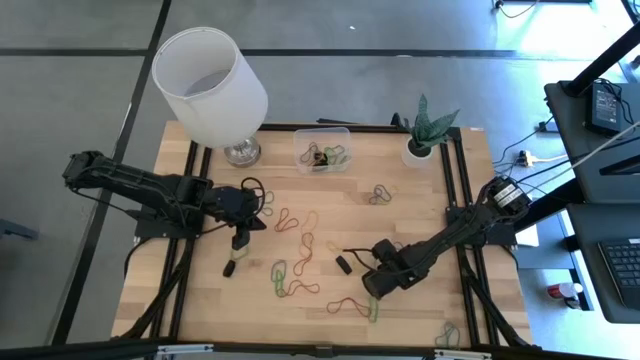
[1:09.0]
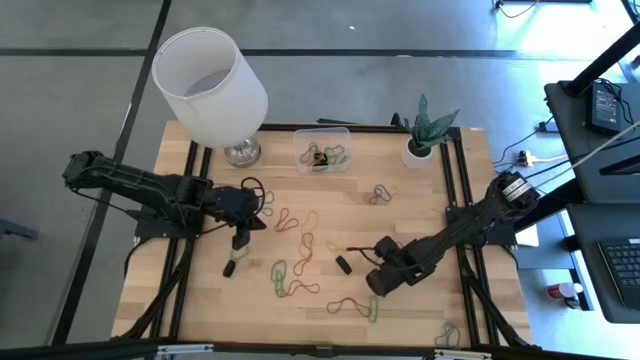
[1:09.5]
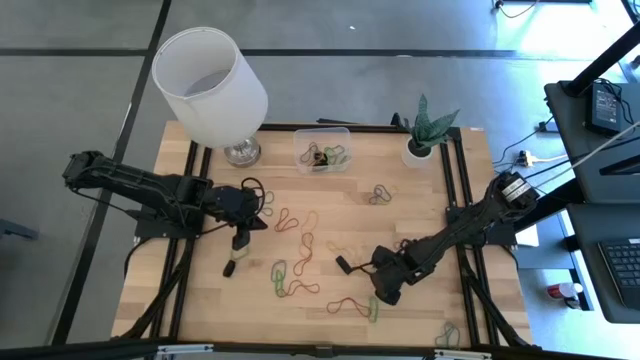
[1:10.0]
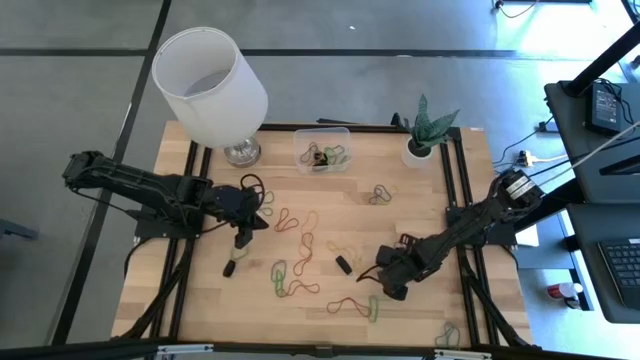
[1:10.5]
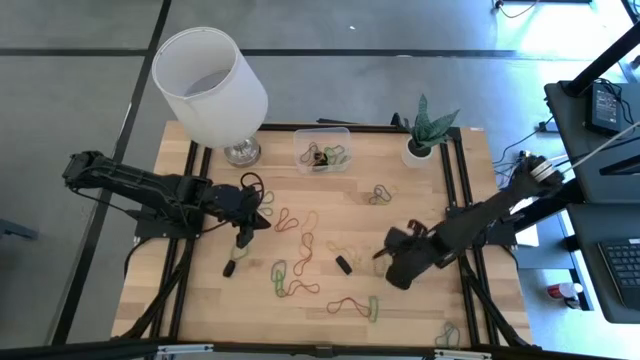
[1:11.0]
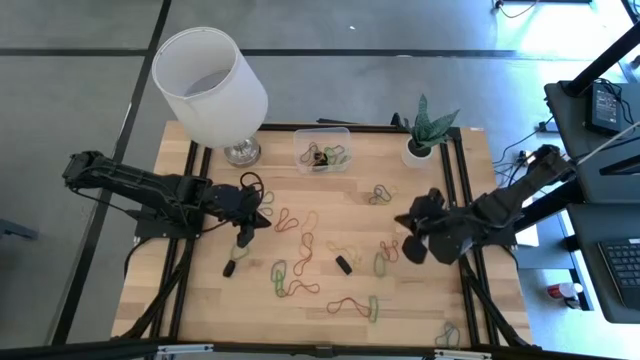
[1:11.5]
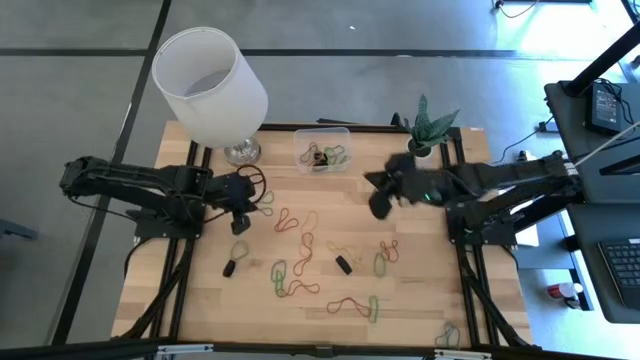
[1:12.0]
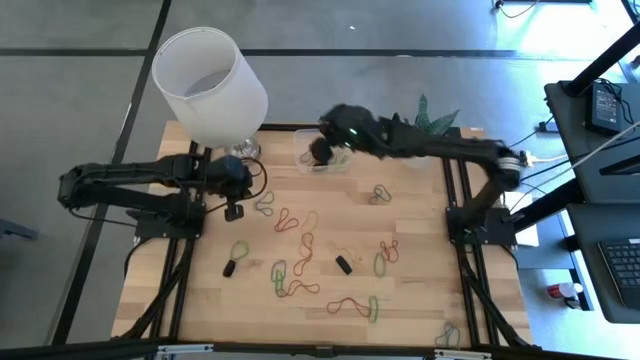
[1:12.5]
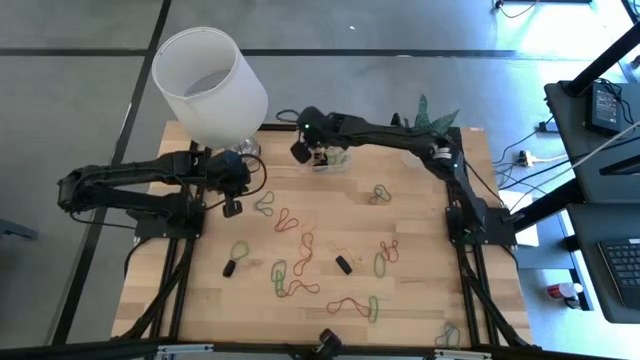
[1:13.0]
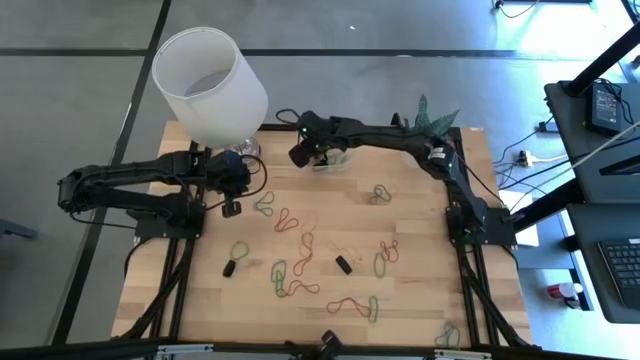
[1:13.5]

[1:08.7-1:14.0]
Task: Pick and place rubber bands into bin
Put the yellow rubber band into the transparent bin

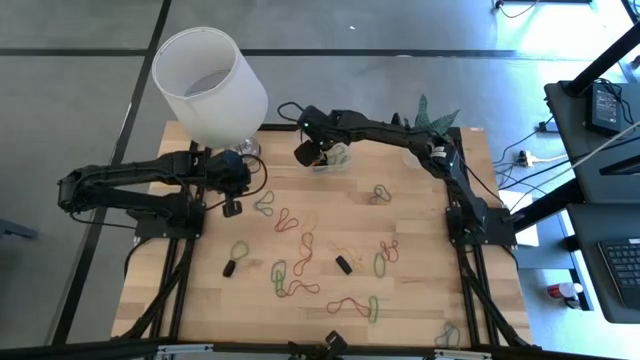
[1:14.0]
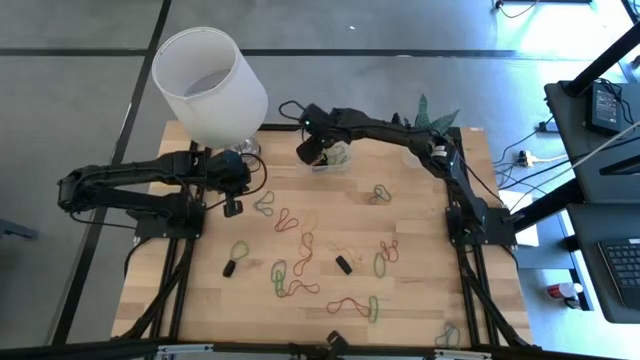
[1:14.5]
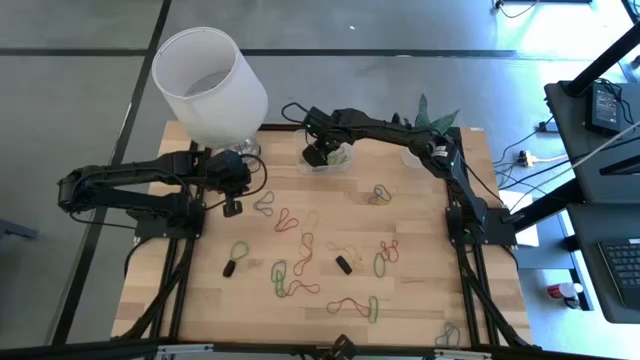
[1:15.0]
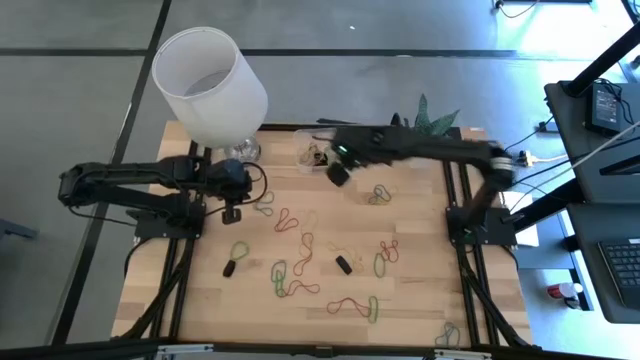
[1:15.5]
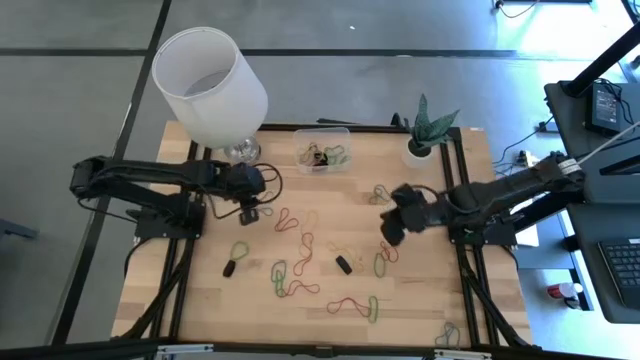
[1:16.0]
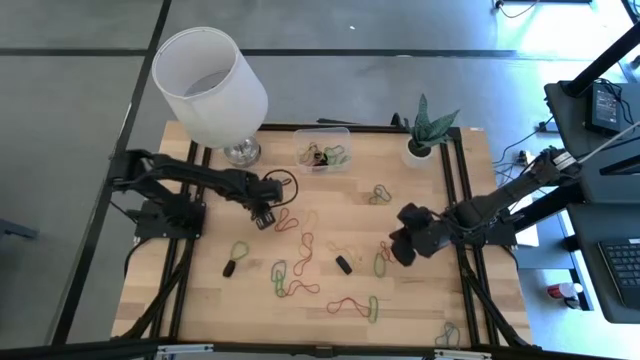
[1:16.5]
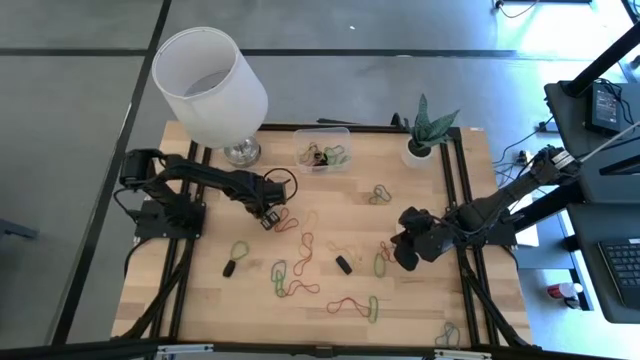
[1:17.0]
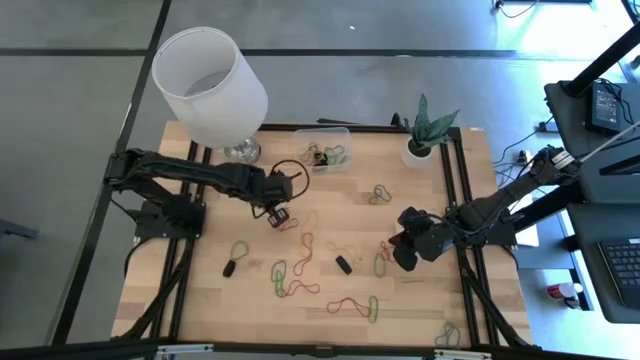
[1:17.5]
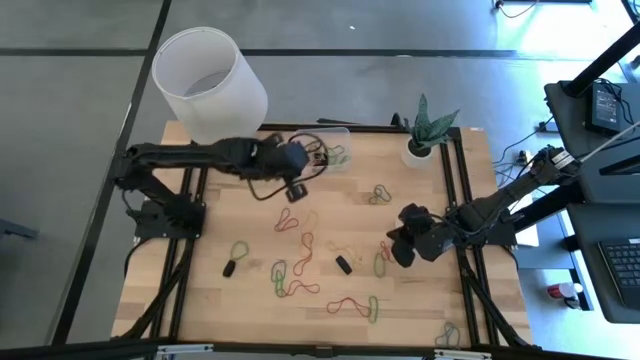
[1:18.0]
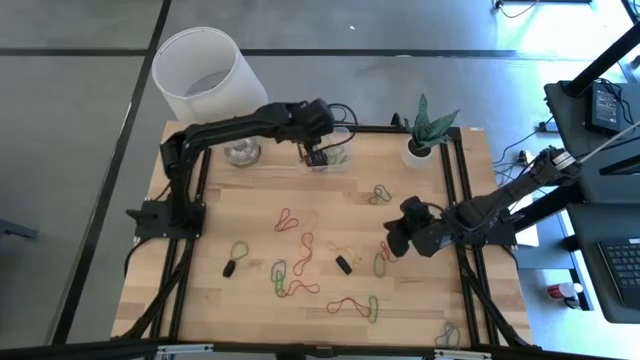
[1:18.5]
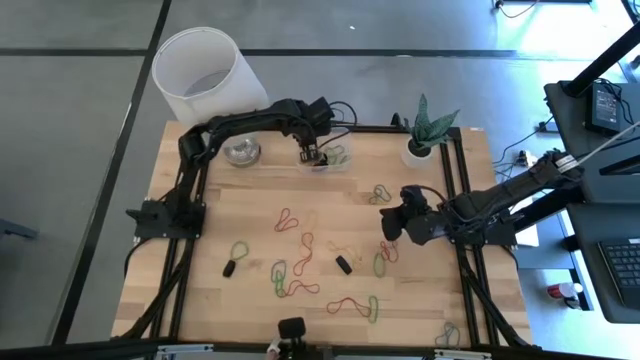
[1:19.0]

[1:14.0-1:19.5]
Put the blue rubber band into the transparent bin

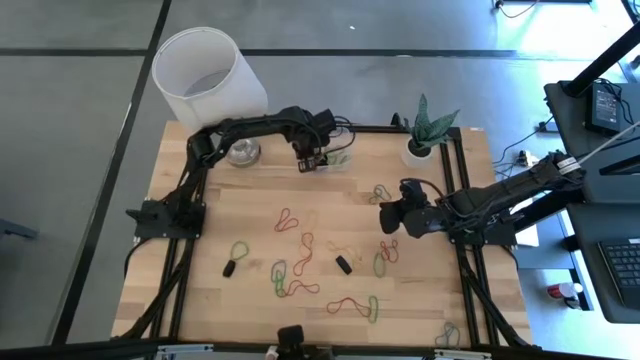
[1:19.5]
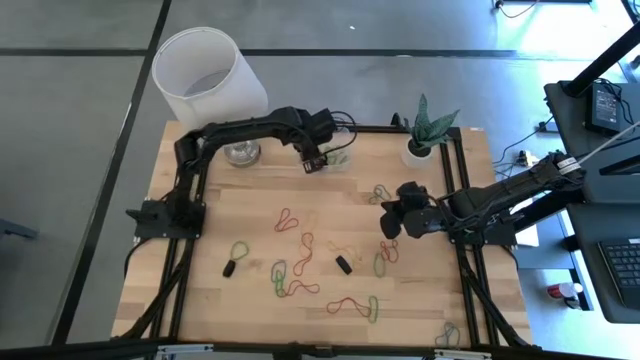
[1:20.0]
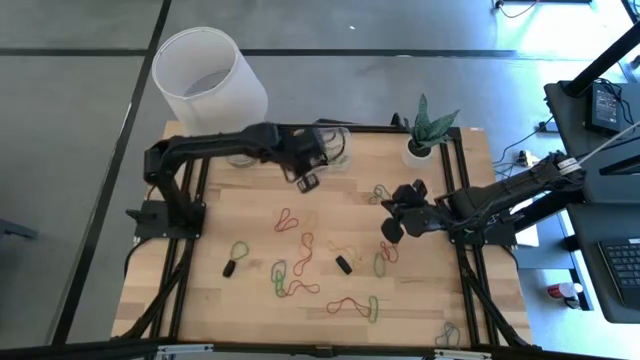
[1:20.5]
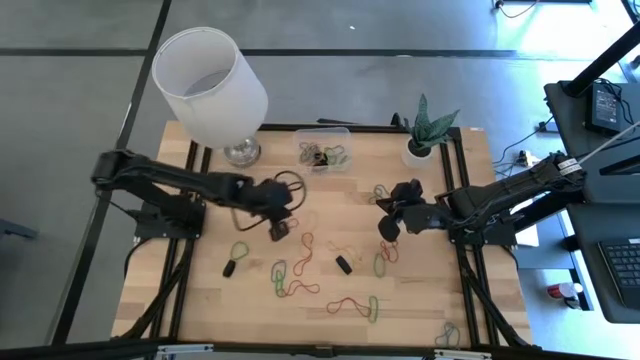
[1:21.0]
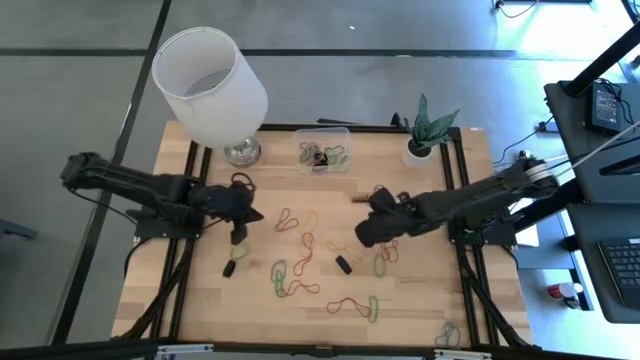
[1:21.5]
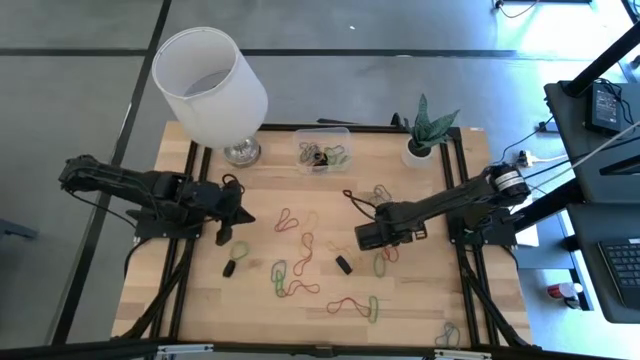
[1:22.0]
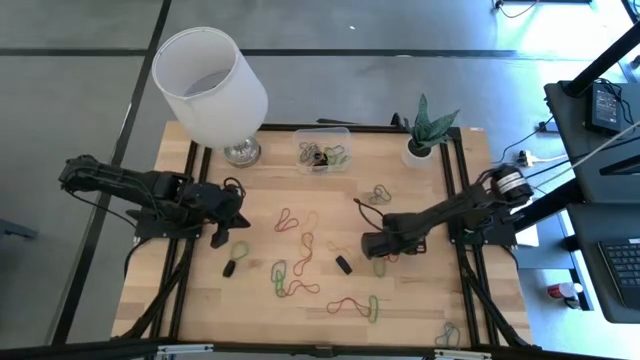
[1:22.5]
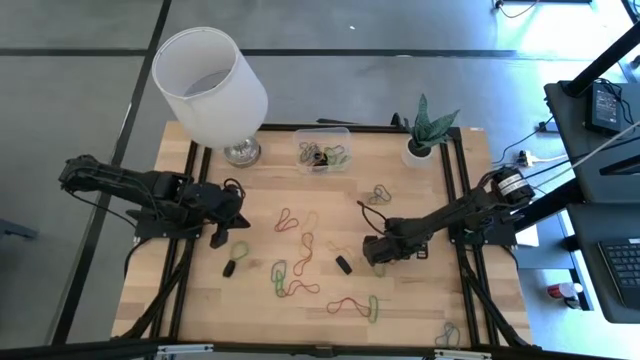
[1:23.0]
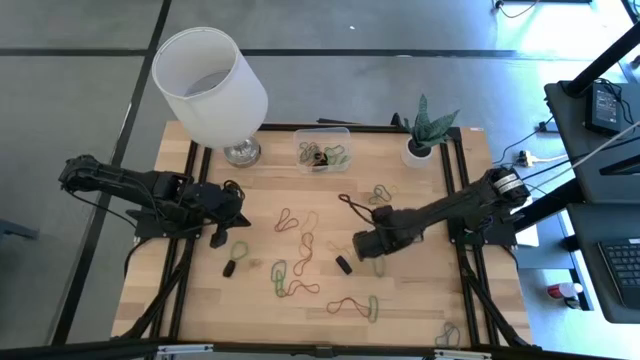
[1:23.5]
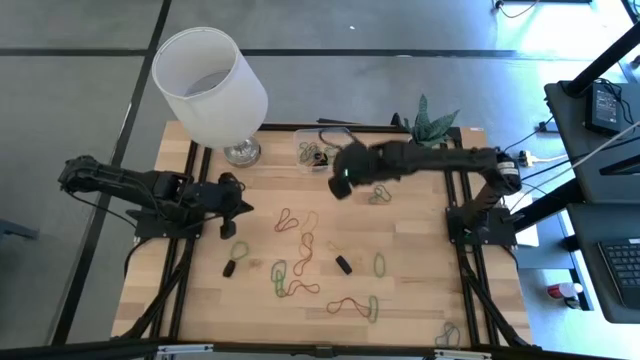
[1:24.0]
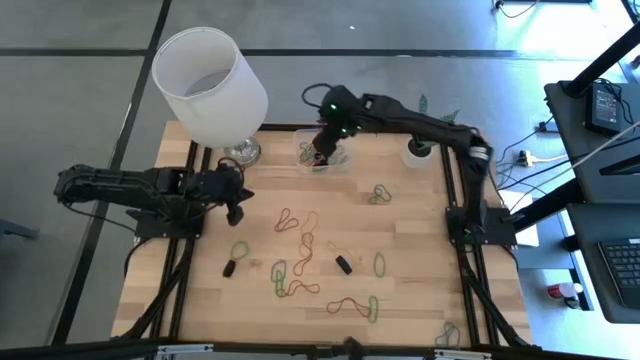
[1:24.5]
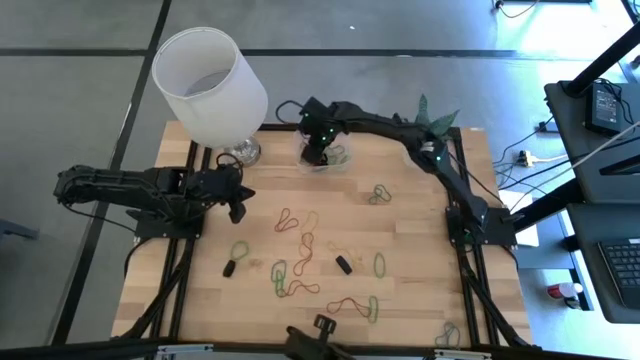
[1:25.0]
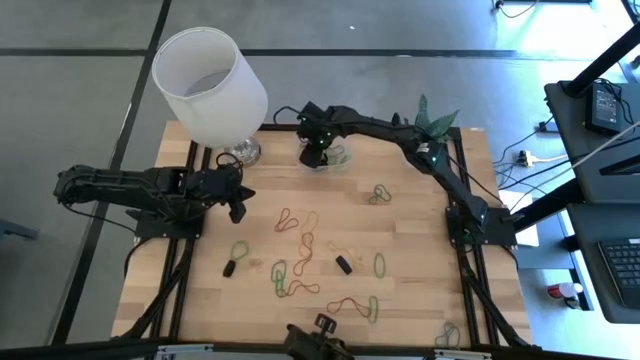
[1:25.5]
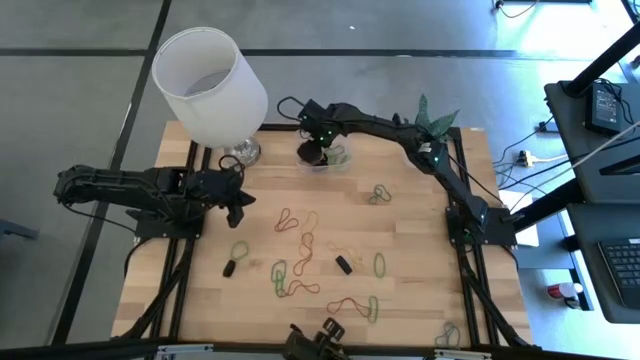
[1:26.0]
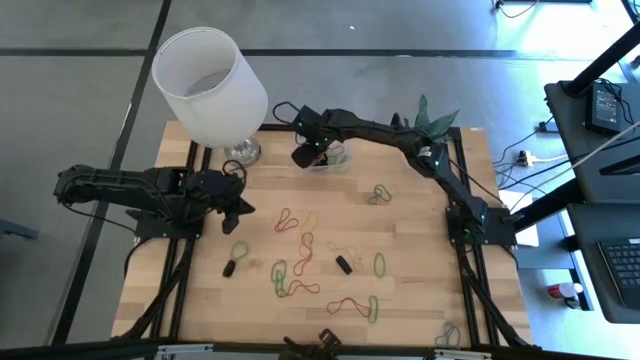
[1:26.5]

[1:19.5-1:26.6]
Put the red rubber band into the transparent bin

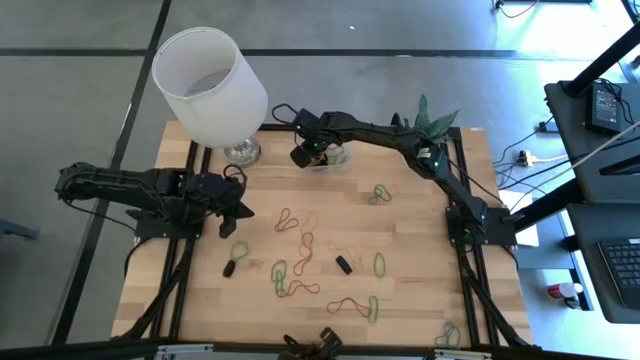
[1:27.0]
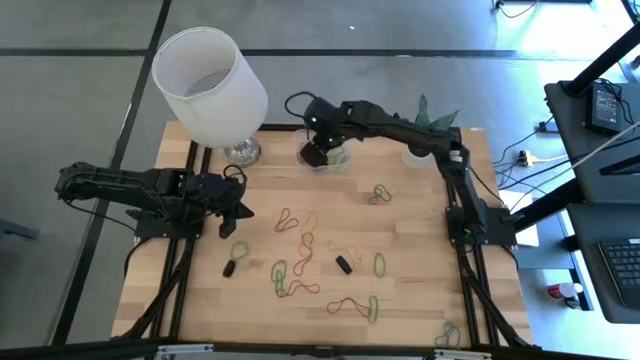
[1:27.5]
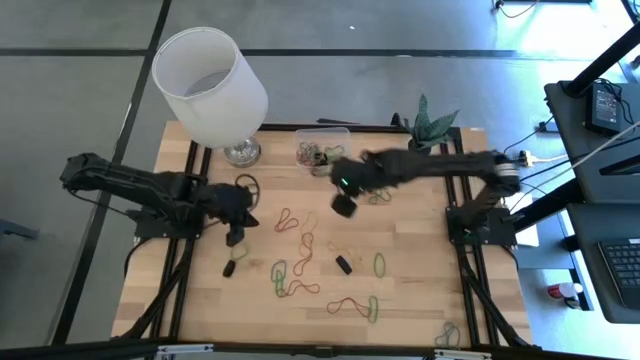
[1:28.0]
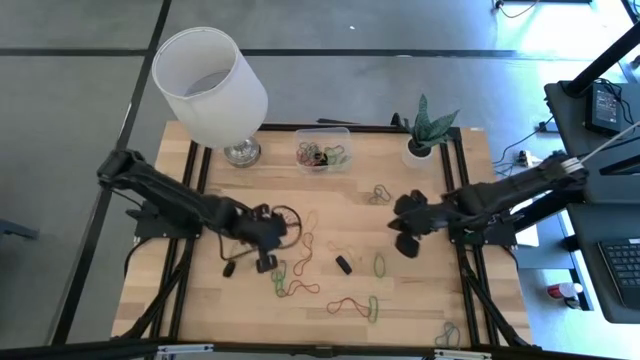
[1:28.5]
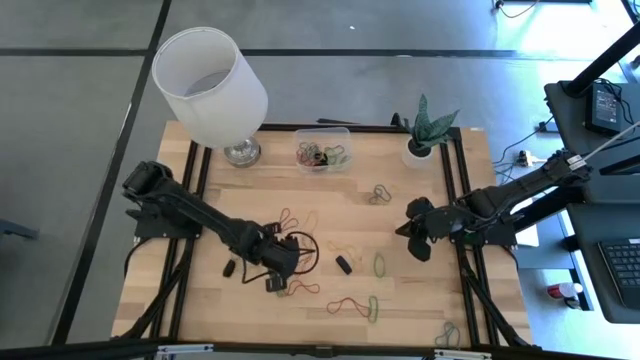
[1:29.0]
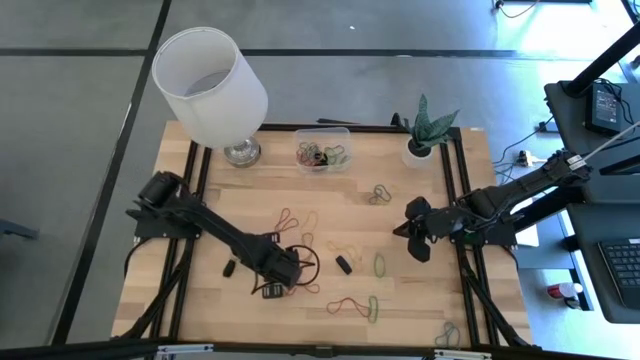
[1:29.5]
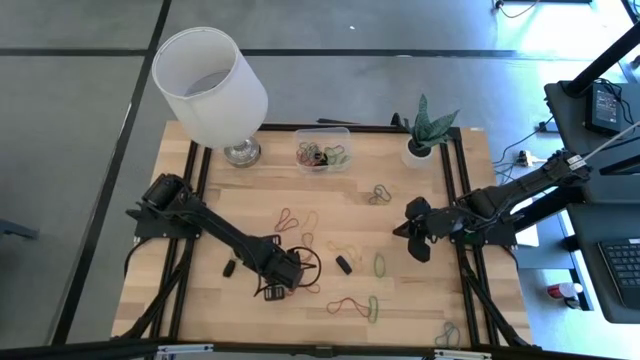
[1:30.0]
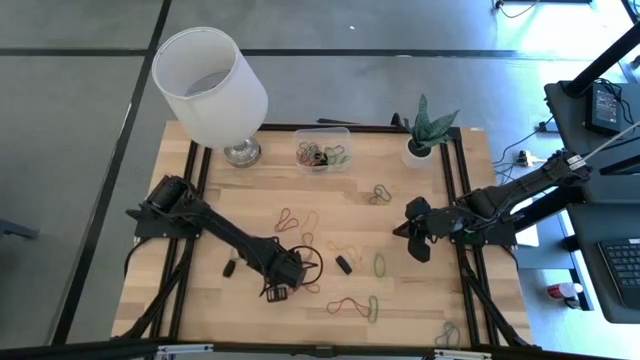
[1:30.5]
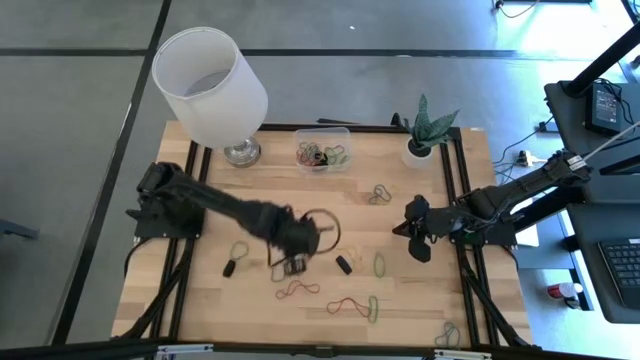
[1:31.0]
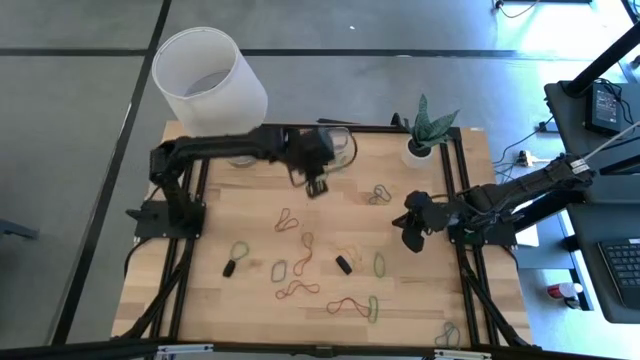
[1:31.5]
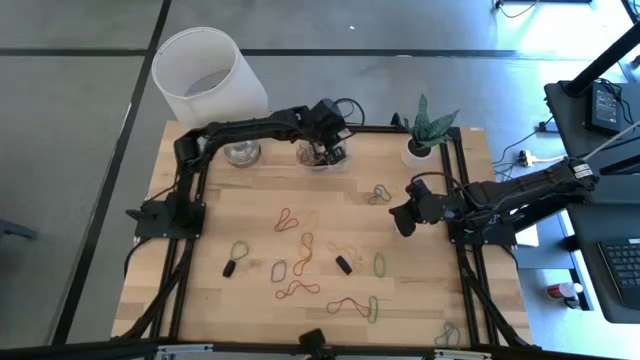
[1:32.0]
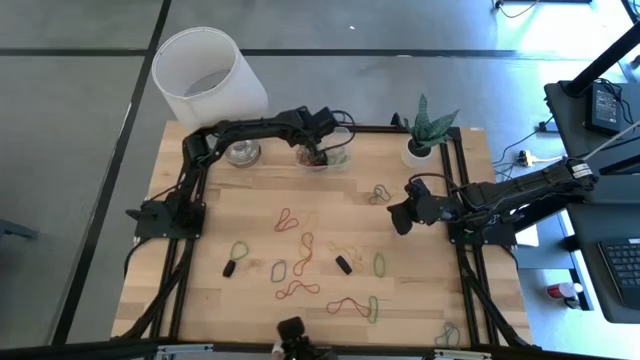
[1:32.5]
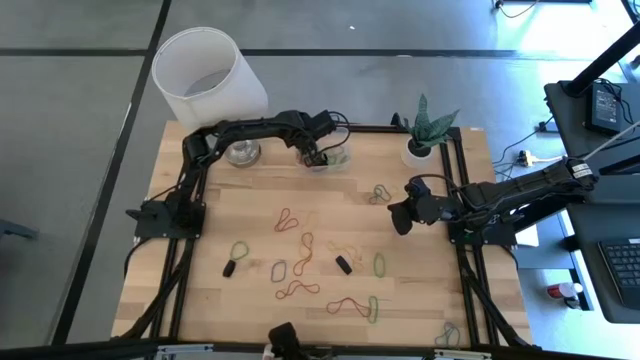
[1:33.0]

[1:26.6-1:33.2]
Put the green rubber band into the transparent bin
